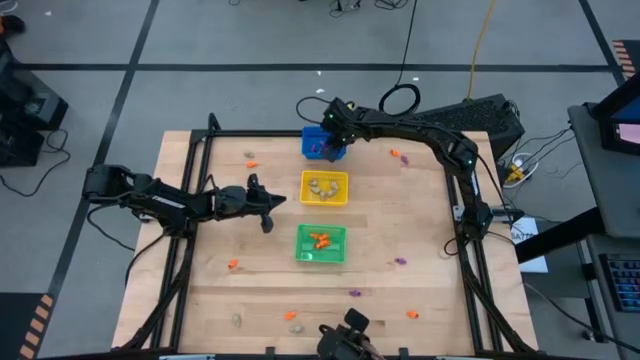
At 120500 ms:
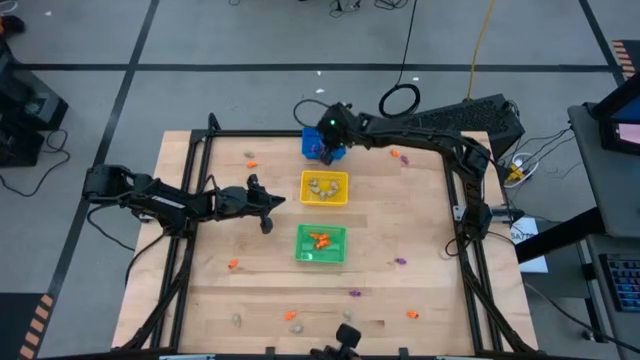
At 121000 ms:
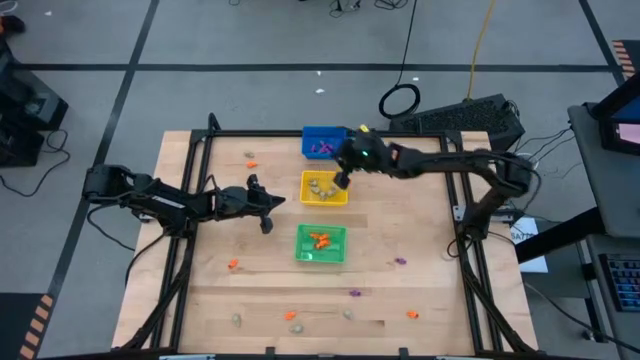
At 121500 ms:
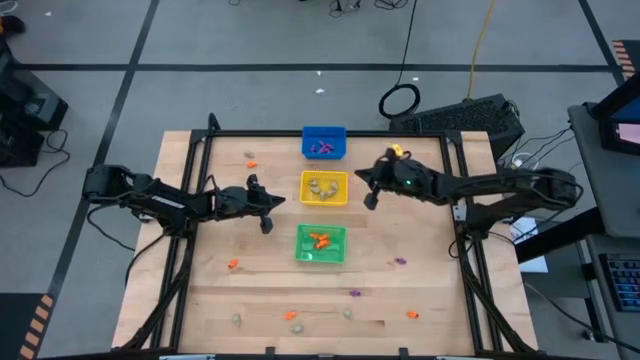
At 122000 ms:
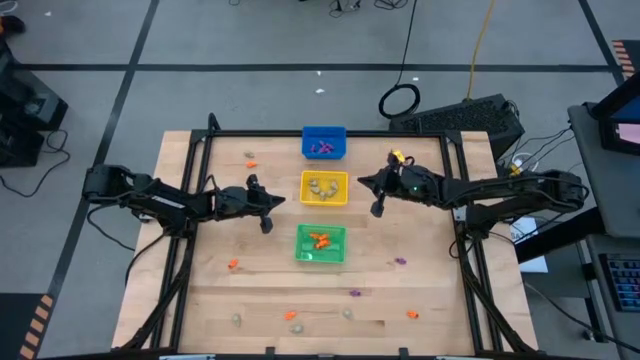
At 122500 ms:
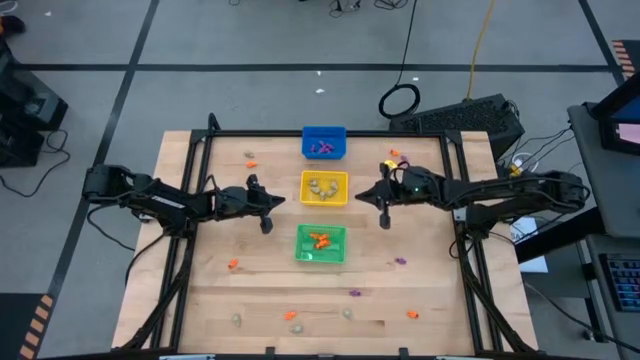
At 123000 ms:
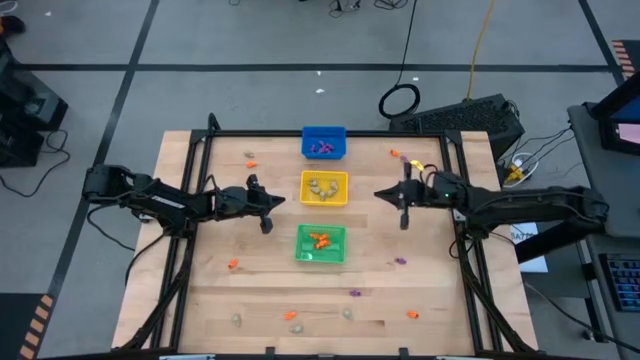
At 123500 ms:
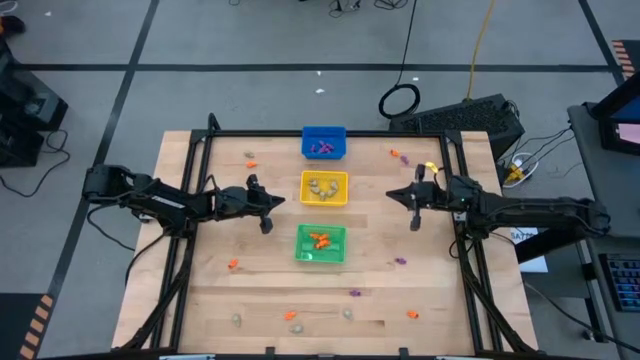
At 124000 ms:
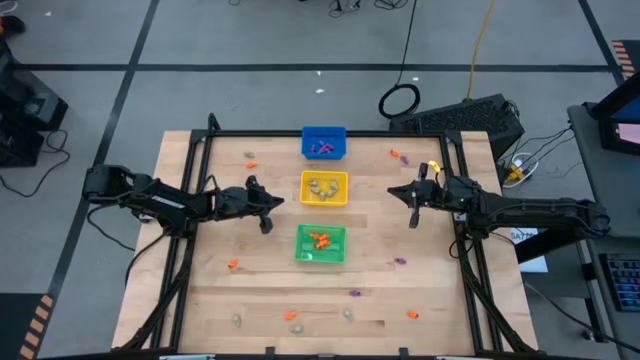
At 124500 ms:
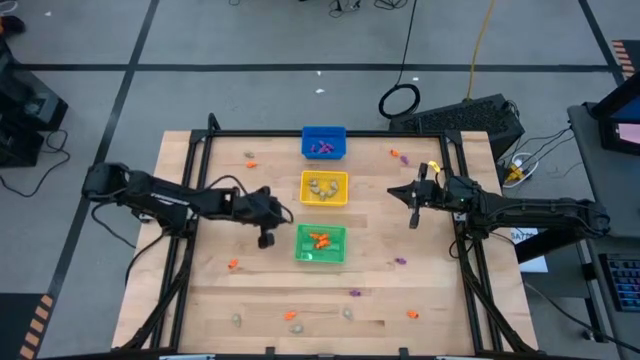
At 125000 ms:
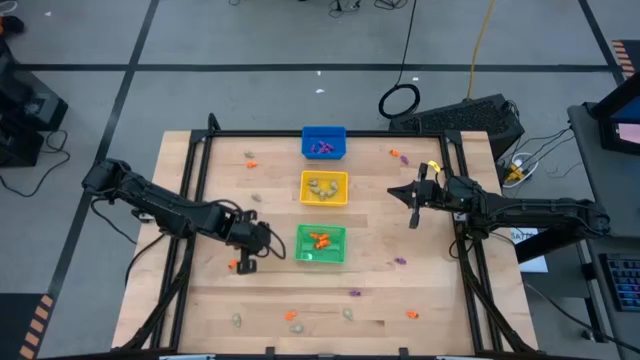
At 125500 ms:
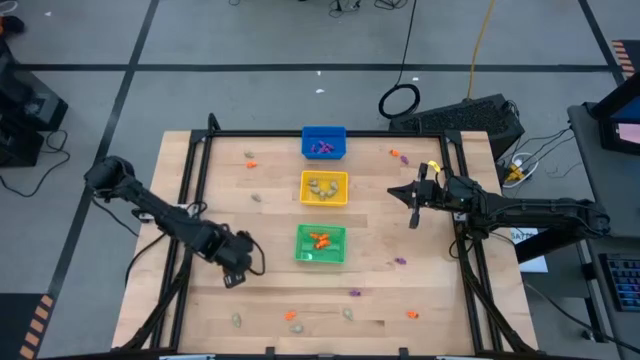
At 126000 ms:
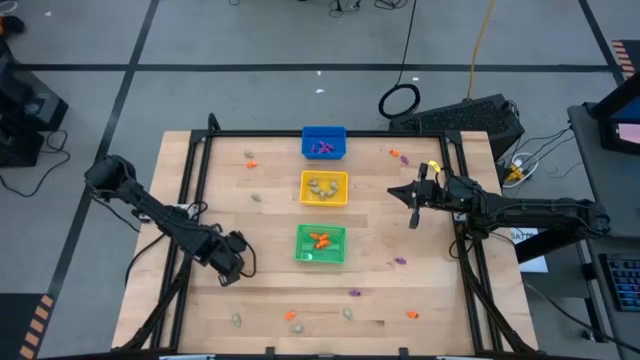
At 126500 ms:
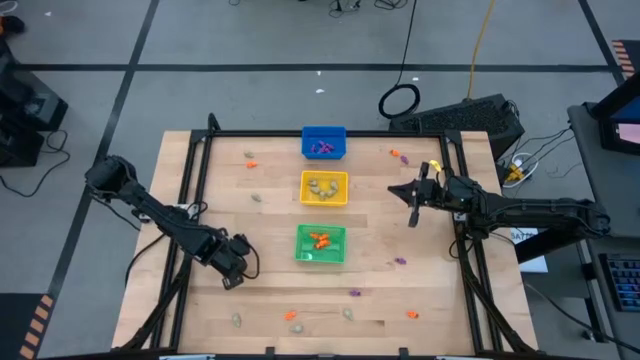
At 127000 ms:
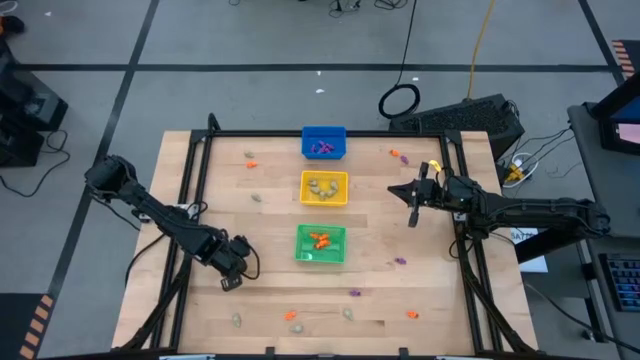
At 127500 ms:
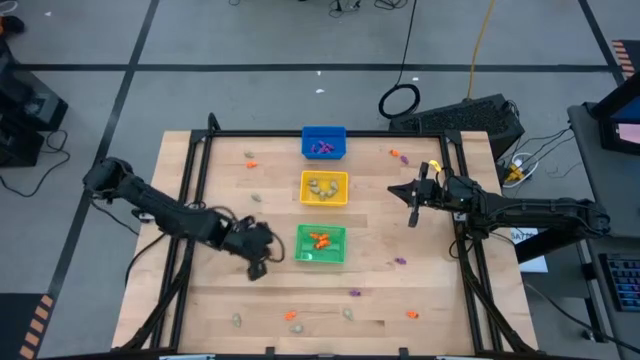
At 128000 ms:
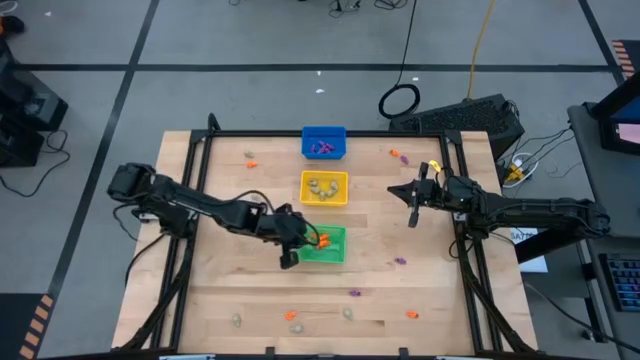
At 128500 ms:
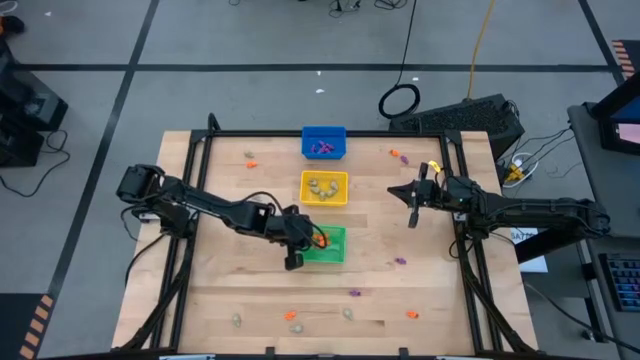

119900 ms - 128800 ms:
Task: Sort Halloween decoration
Put the orange skeleton toy into the green bin

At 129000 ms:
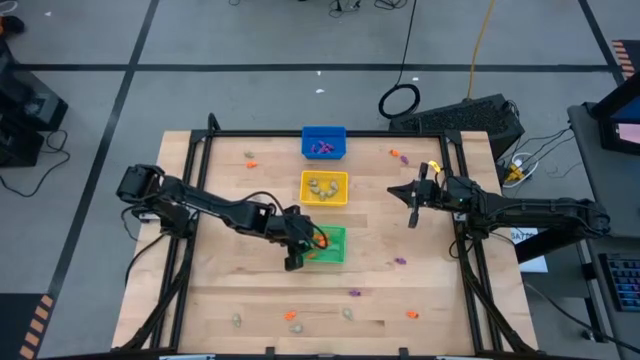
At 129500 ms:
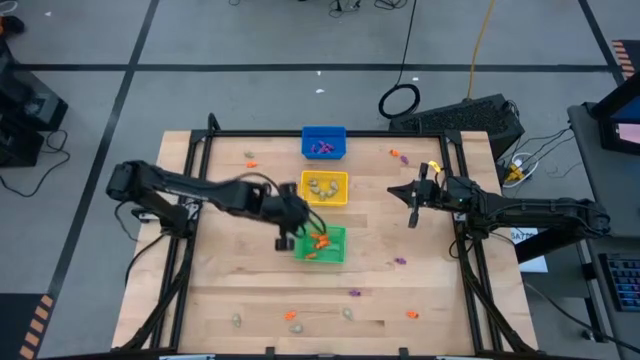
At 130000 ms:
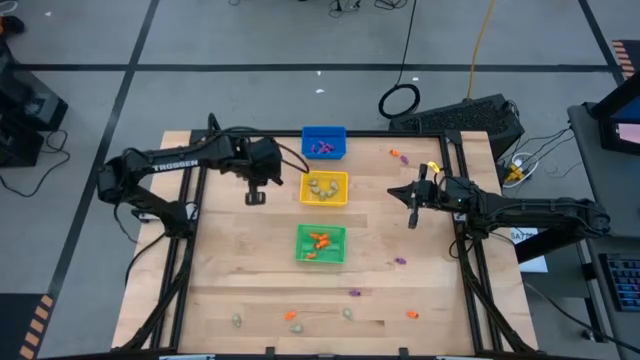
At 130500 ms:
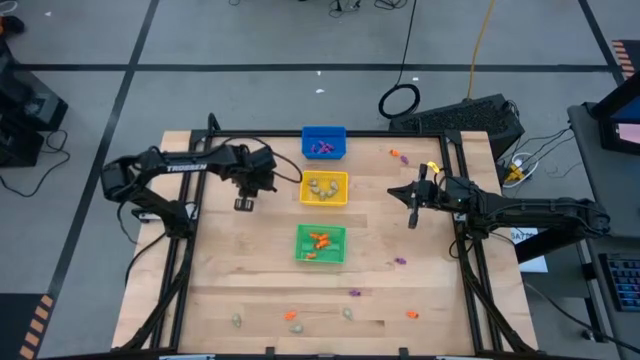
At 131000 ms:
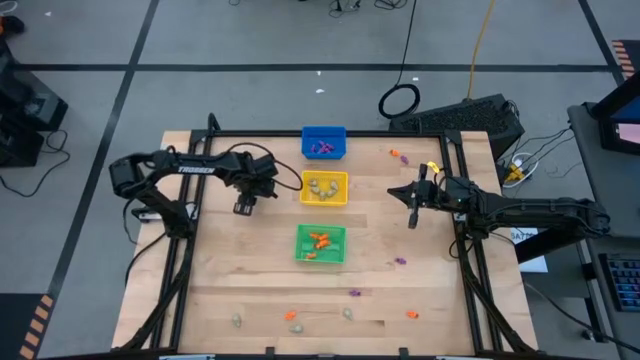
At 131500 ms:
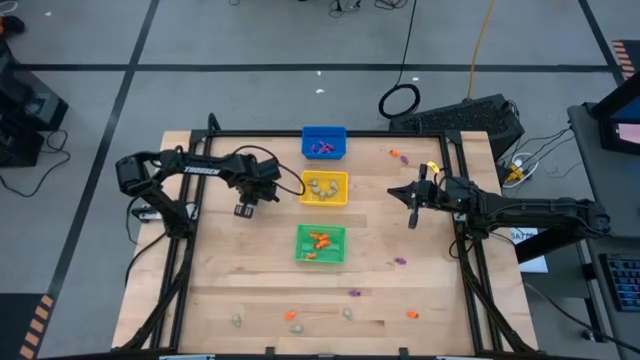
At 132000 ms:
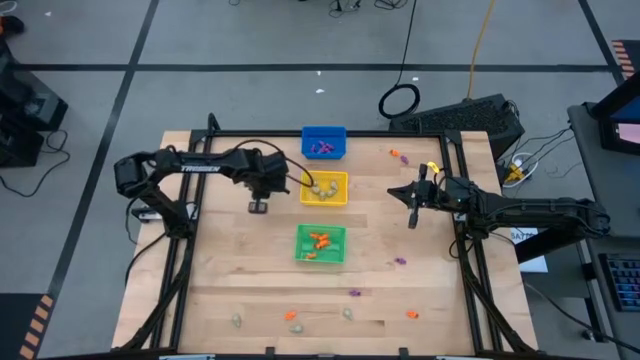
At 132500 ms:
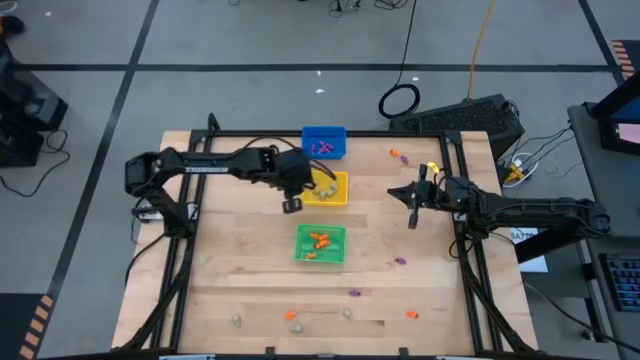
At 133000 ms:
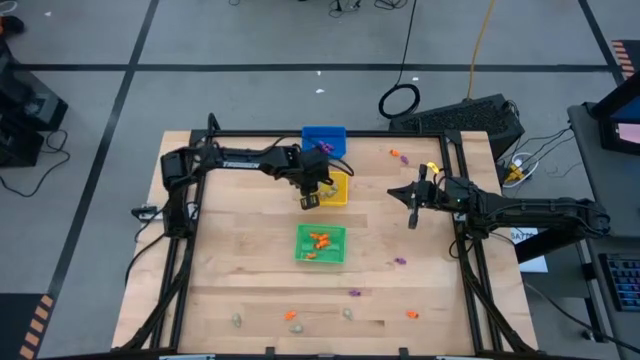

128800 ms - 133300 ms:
Put the skull toy into the yellow bin

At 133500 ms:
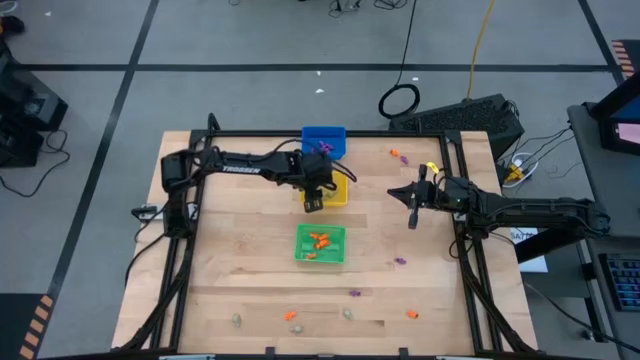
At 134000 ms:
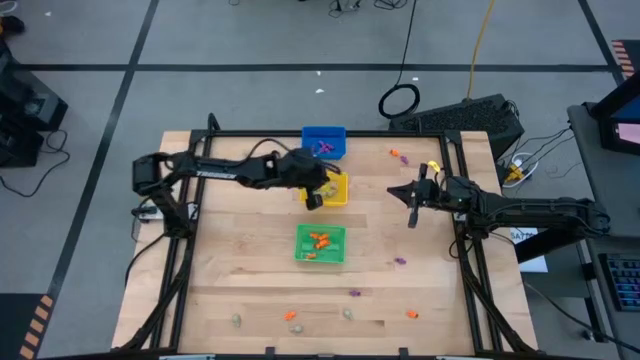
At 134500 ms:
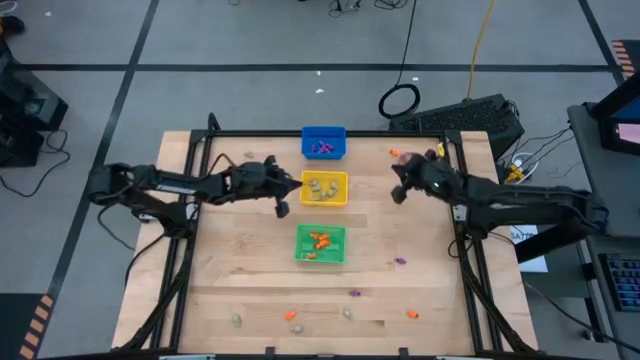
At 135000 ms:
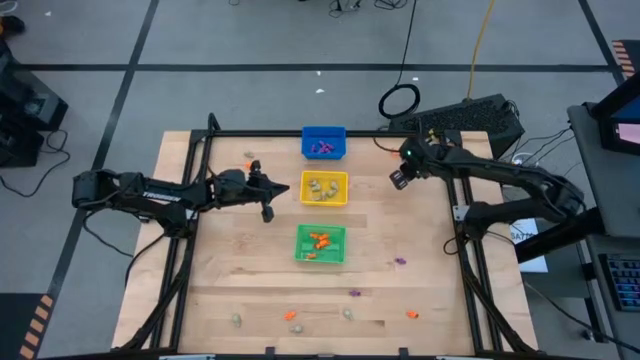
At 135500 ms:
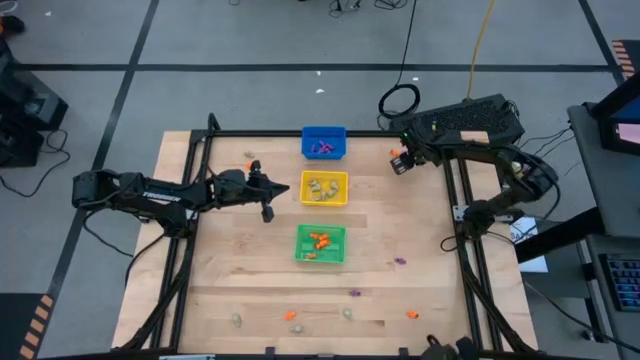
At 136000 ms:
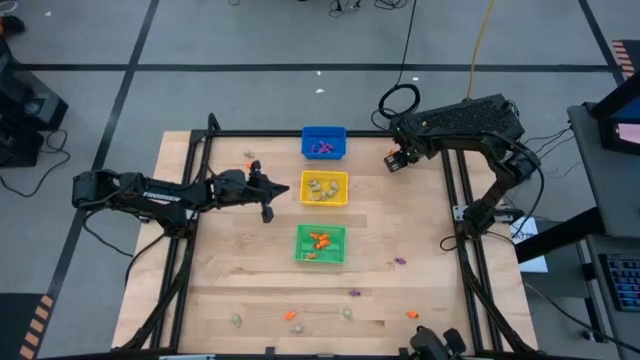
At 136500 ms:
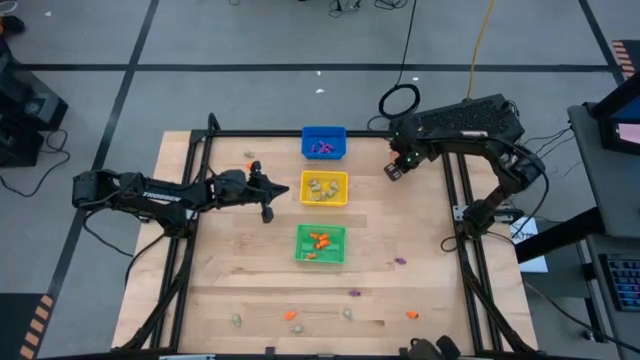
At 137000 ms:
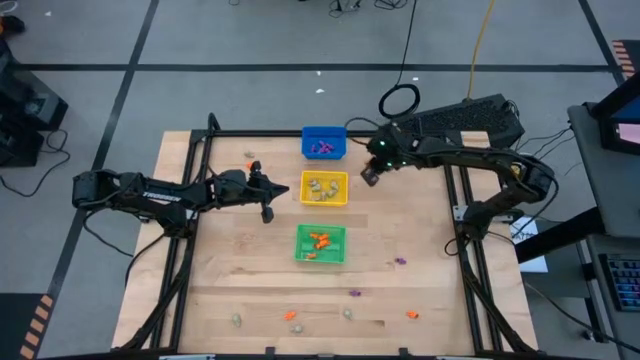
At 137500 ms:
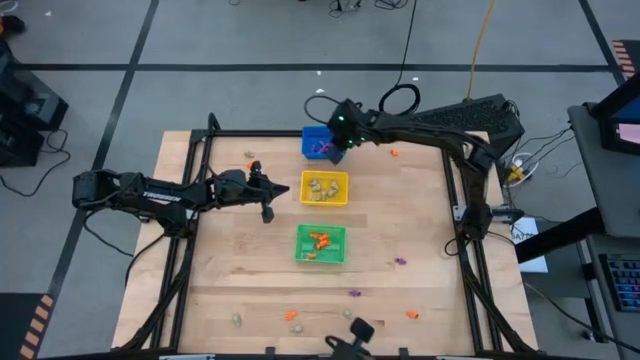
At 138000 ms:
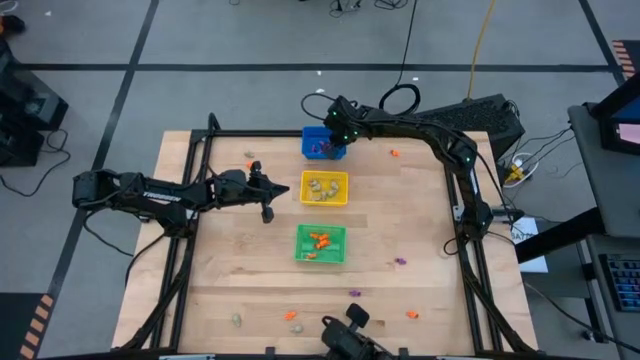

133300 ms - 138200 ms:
Put the top purple skeleton toy into the blue bin

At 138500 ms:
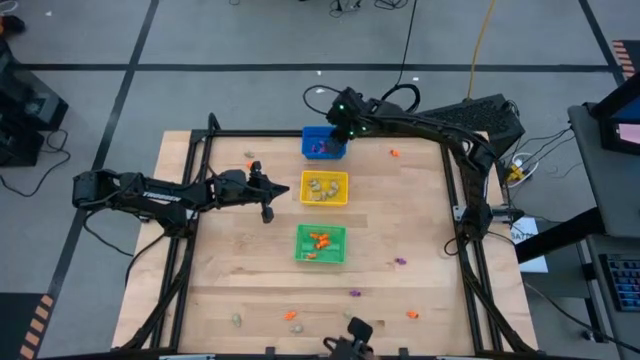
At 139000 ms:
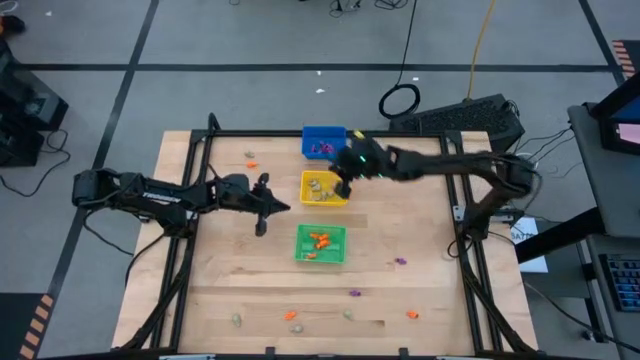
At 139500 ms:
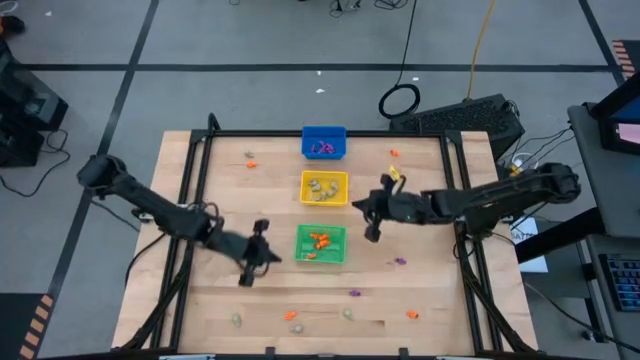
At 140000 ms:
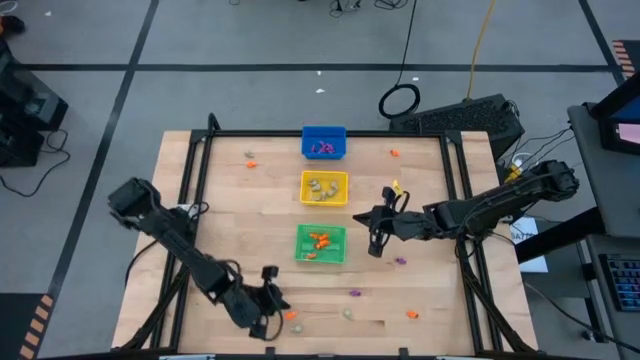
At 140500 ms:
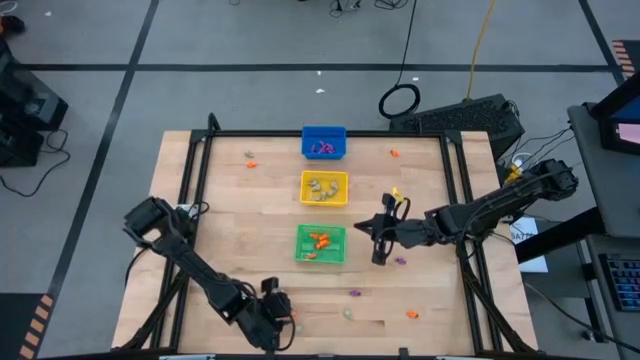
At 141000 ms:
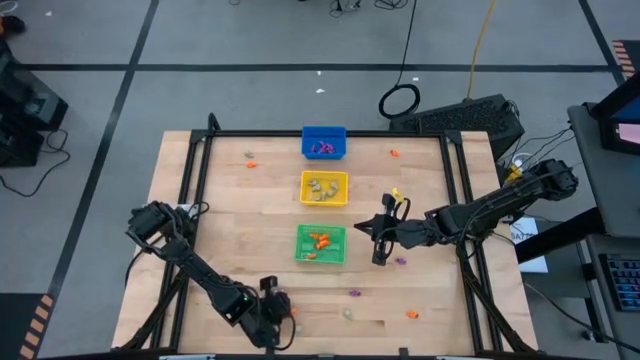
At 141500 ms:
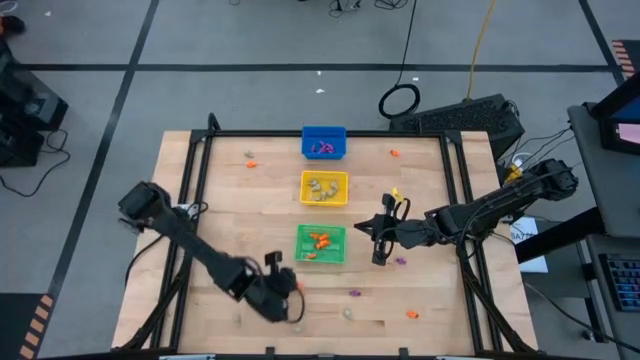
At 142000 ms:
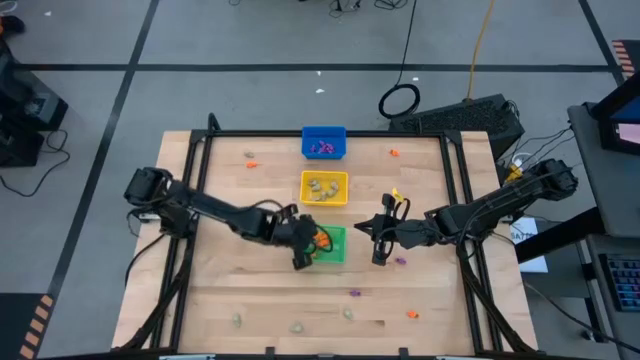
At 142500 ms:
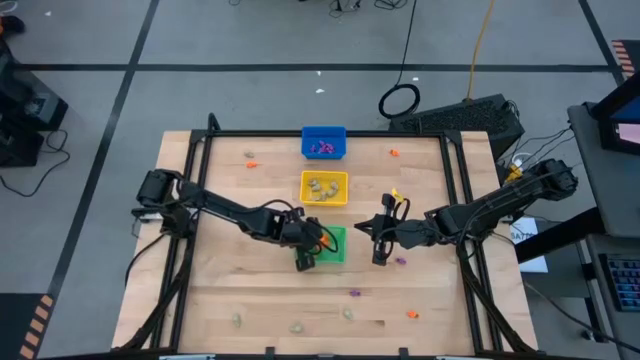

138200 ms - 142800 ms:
Put the bottom left orange skeleton toy into the green bin
